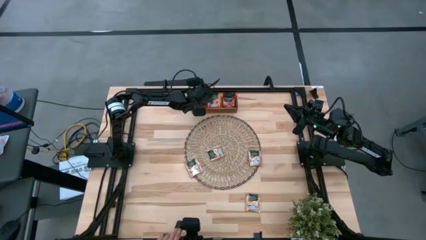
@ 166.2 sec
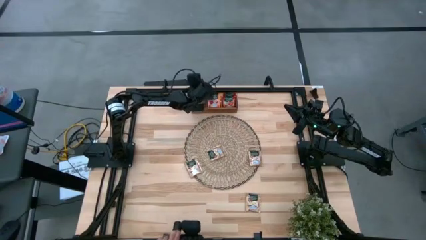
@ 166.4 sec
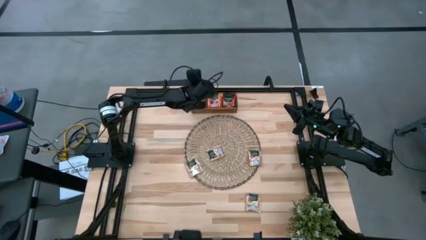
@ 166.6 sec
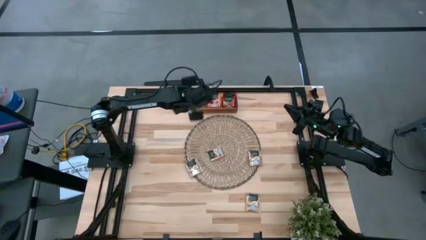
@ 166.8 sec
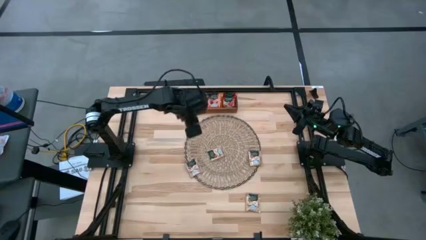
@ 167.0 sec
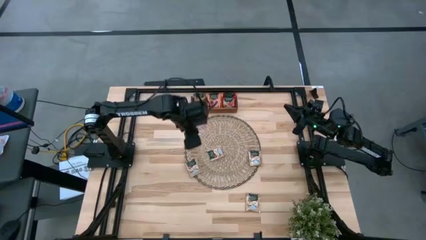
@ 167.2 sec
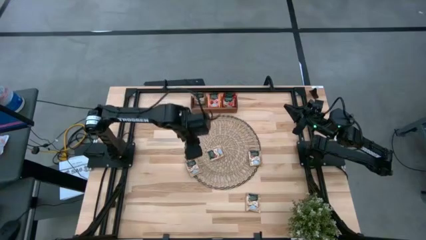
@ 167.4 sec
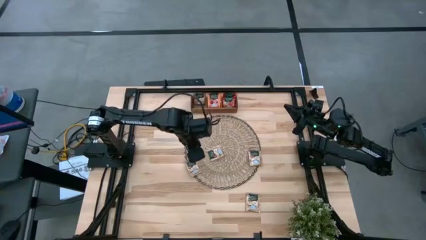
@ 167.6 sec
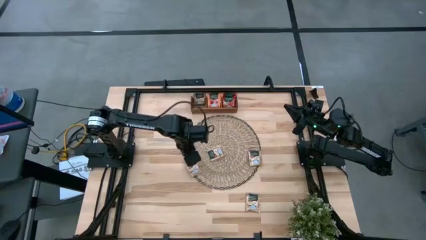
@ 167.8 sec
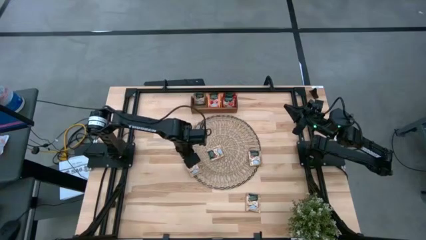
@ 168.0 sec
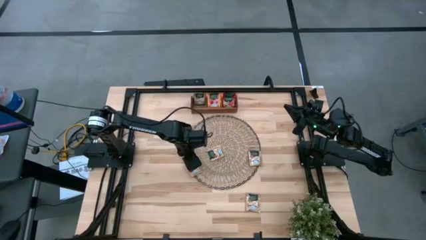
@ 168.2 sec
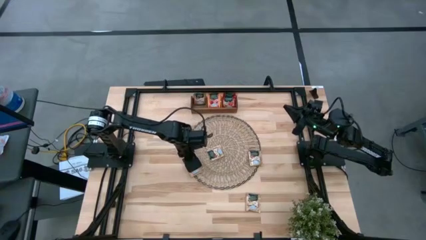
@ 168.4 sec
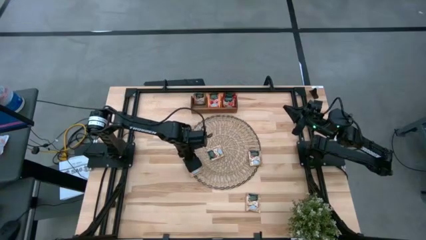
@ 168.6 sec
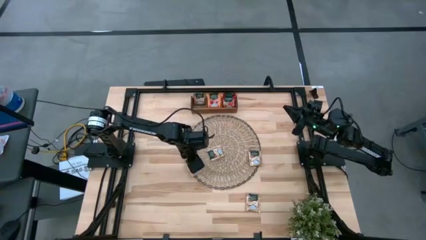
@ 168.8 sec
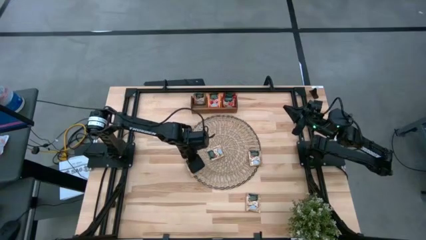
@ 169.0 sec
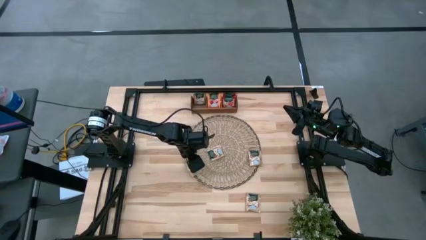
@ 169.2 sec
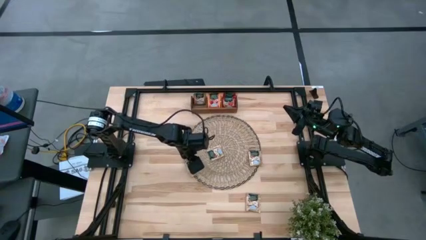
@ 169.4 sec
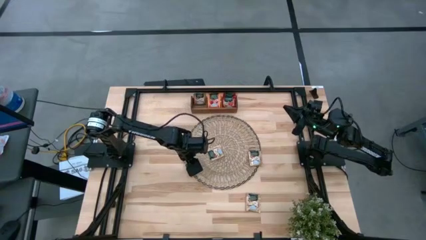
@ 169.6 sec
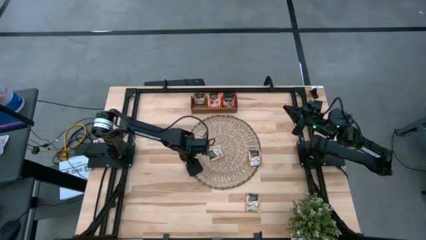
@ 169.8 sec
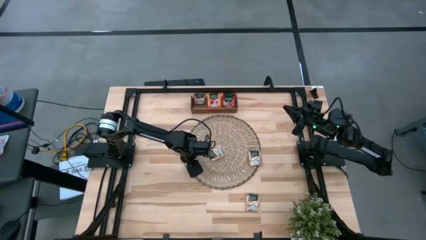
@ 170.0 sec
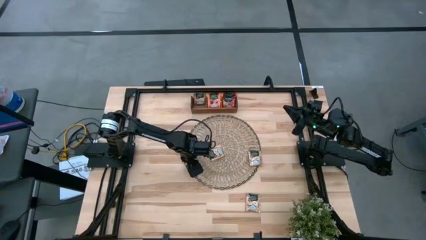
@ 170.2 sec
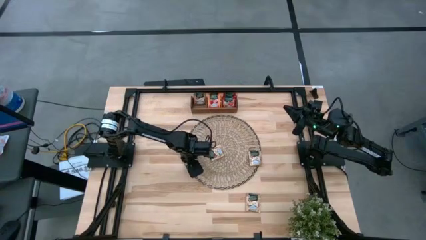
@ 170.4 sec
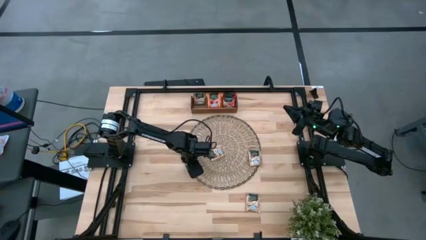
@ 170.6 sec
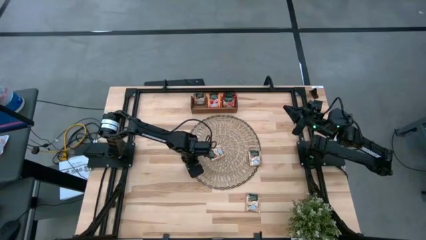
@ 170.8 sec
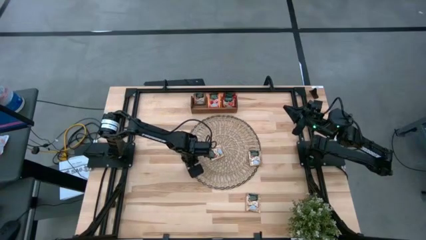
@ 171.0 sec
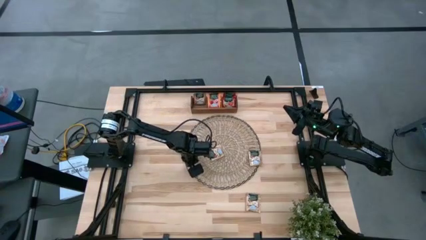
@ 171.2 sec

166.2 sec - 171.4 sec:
Task: Pick & Place Tea
Put the brown tea bag into the left section of the wooden organizer

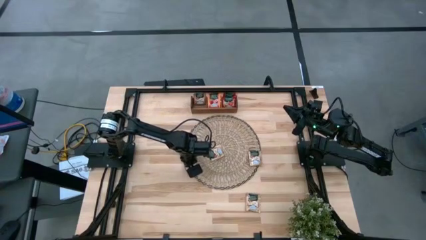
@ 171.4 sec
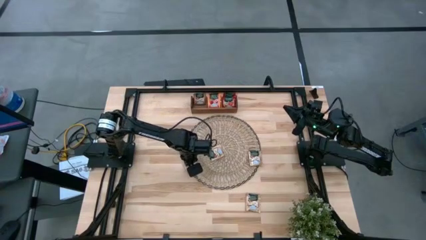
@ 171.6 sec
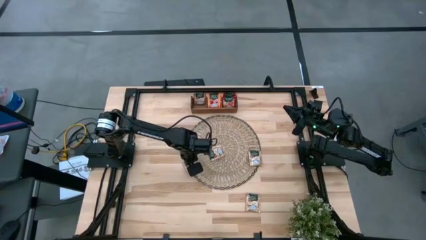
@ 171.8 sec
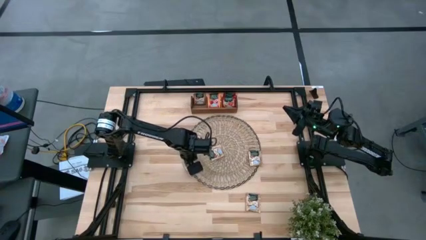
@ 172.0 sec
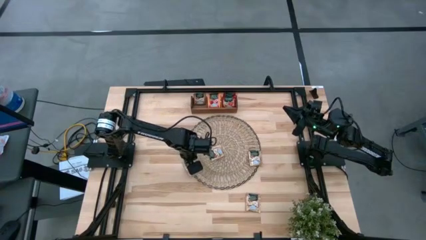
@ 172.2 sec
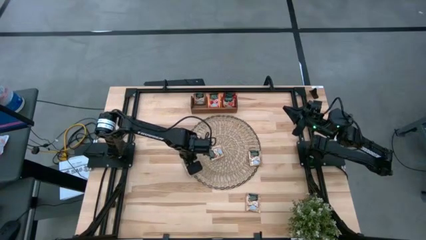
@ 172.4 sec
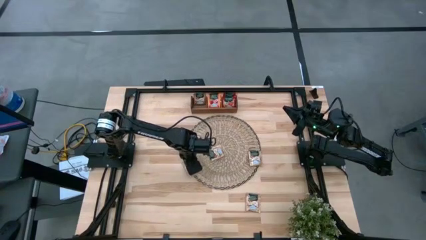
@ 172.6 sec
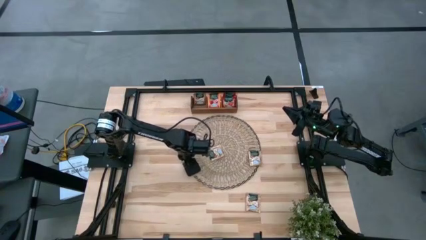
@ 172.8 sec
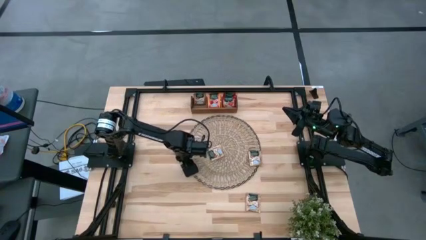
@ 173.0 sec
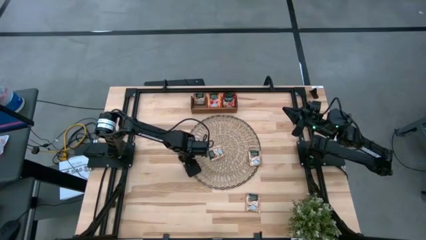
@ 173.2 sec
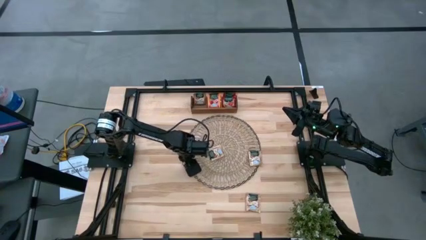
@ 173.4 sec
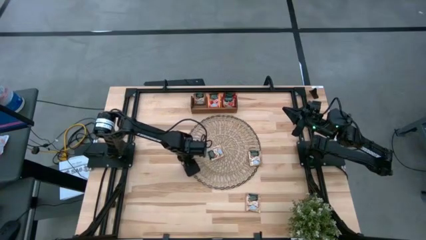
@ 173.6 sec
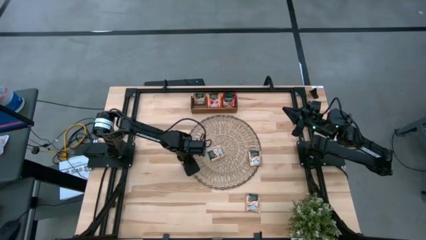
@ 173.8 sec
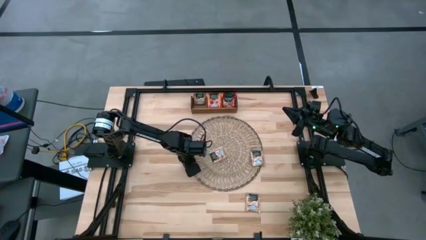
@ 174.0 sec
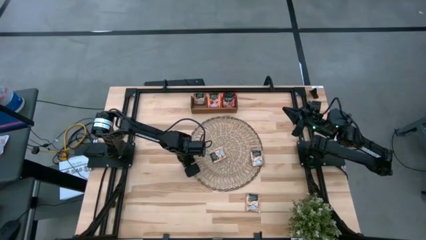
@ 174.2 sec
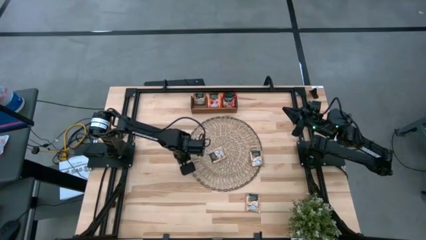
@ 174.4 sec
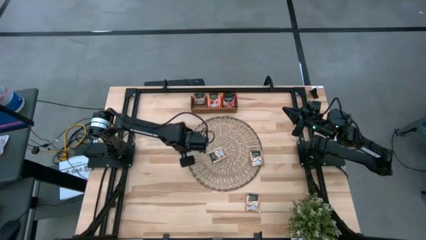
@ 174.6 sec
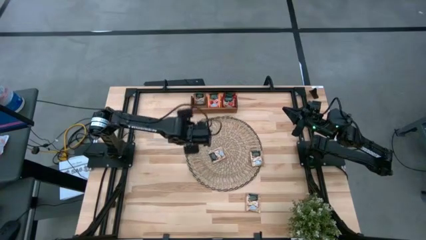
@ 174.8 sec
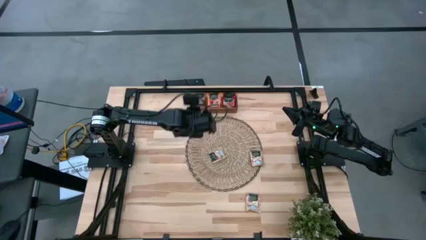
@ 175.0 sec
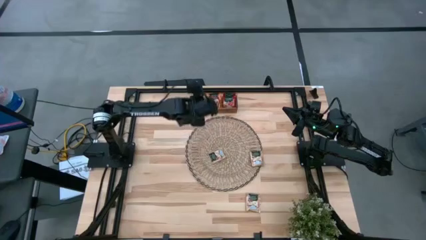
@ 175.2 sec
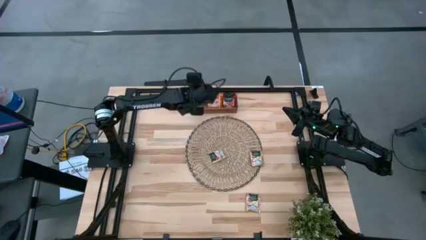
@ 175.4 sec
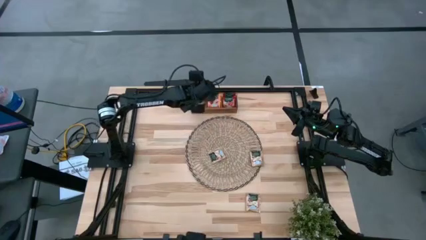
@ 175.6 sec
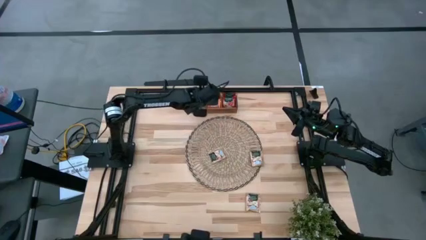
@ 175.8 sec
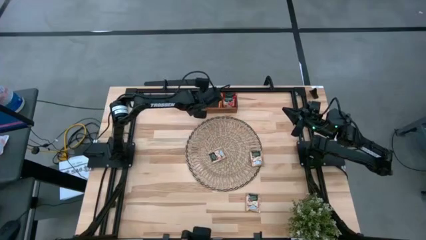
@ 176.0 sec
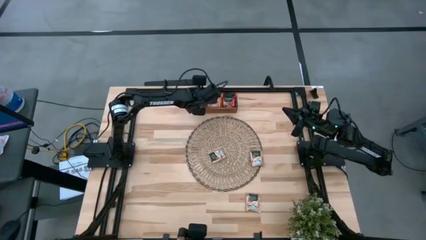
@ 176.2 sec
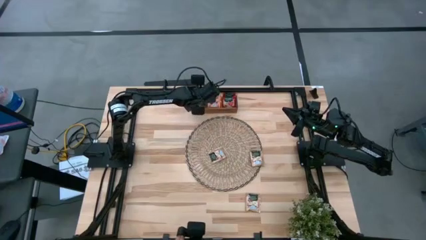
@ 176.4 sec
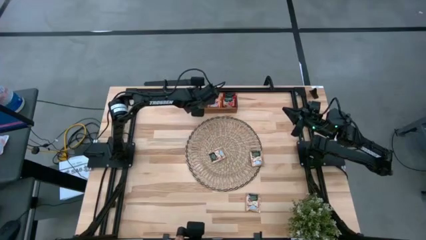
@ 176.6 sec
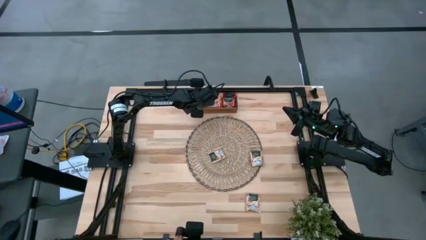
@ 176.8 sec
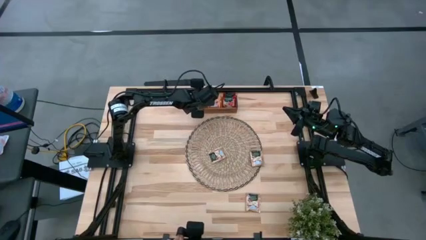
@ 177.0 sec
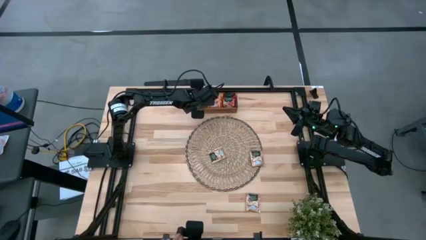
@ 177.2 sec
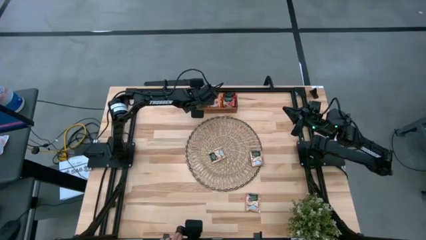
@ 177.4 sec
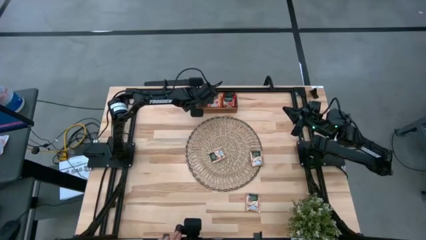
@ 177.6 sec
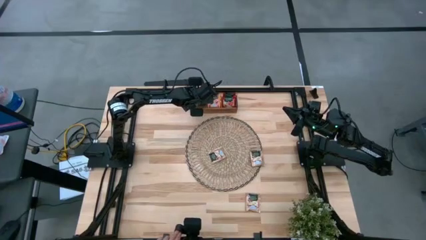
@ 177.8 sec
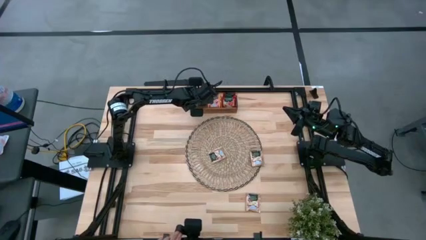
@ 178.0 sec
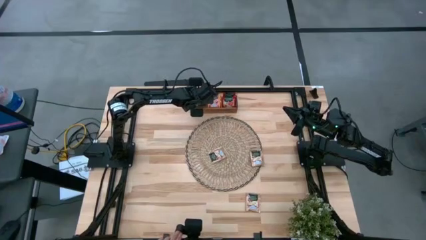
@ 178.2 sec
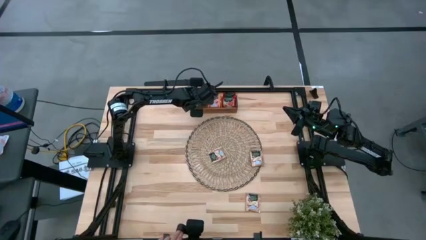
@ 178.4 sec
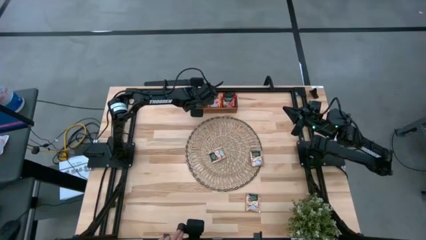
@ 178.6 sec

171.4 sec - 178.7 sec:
Put the brown tea bag into the left section of the wooden organizer

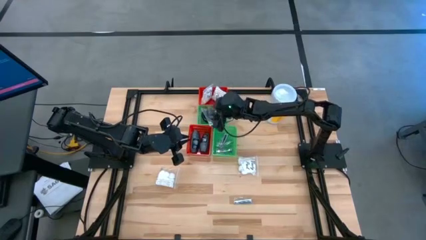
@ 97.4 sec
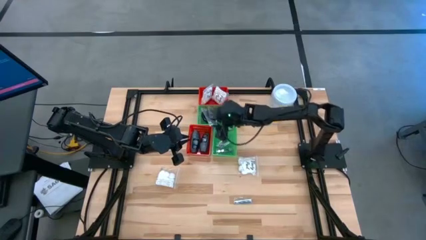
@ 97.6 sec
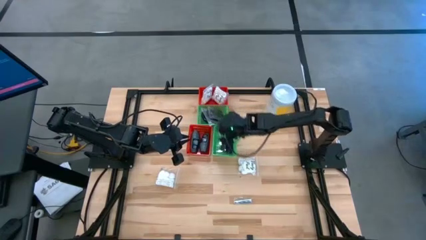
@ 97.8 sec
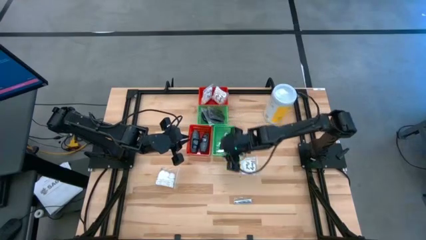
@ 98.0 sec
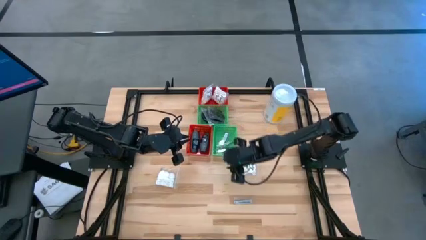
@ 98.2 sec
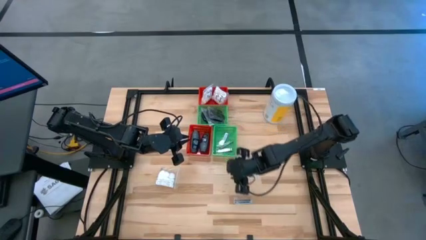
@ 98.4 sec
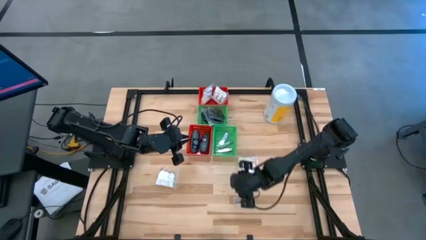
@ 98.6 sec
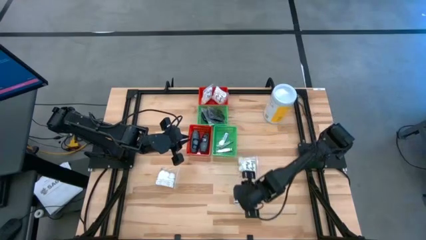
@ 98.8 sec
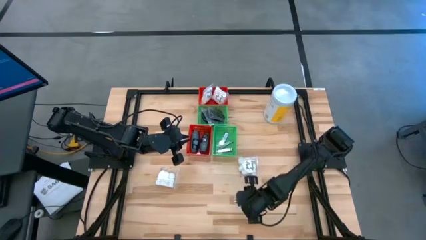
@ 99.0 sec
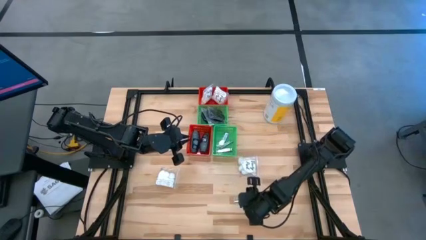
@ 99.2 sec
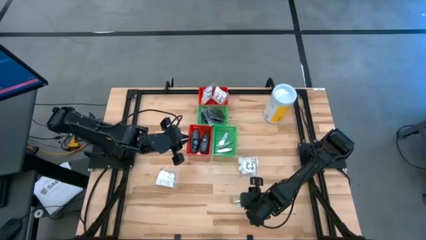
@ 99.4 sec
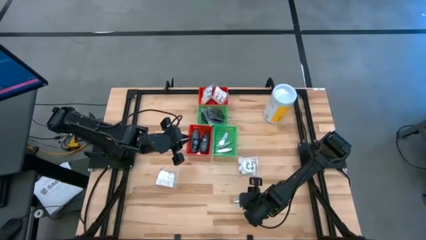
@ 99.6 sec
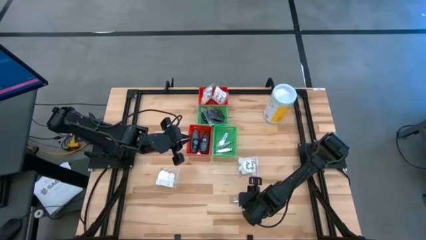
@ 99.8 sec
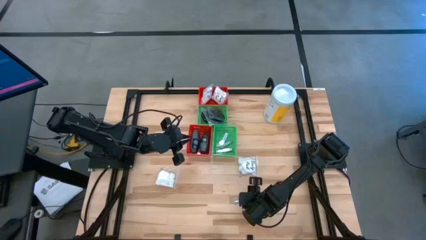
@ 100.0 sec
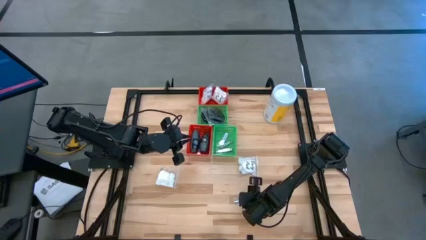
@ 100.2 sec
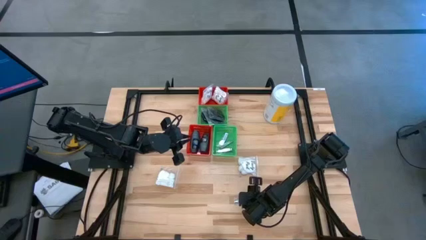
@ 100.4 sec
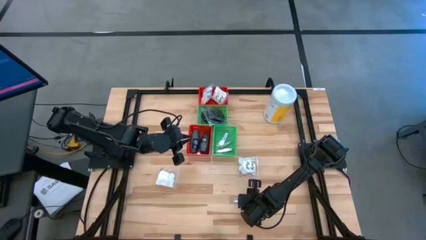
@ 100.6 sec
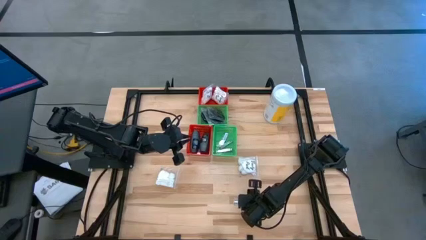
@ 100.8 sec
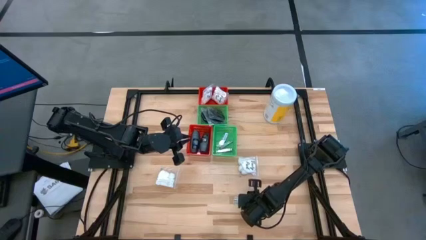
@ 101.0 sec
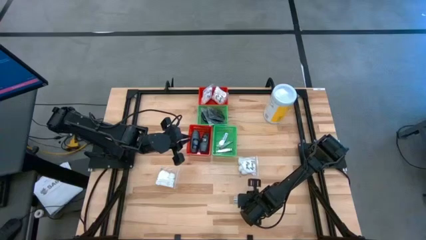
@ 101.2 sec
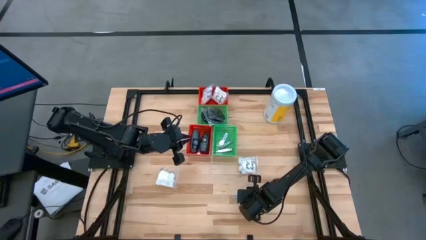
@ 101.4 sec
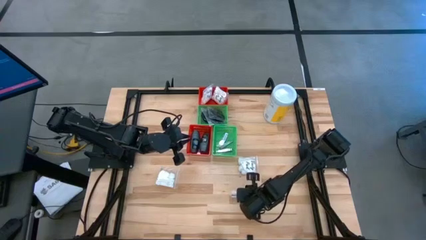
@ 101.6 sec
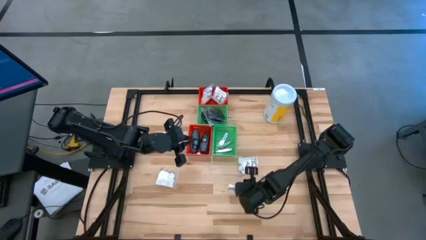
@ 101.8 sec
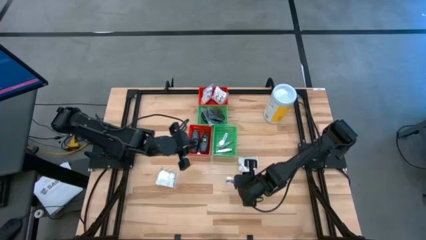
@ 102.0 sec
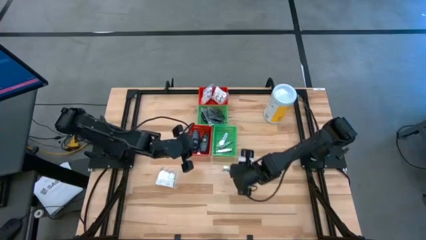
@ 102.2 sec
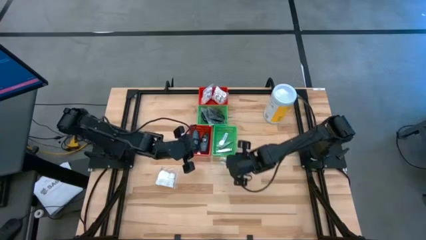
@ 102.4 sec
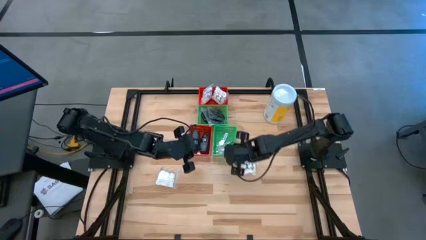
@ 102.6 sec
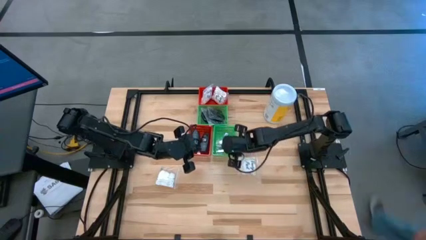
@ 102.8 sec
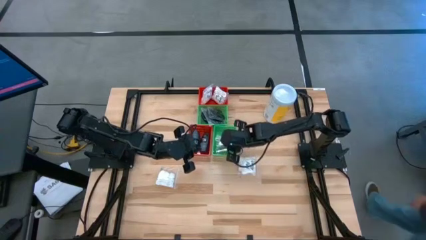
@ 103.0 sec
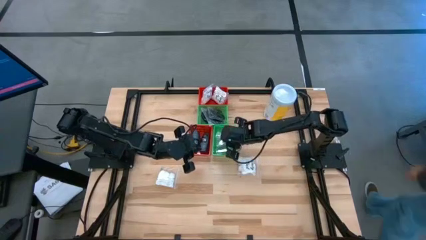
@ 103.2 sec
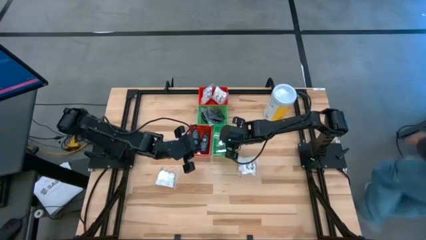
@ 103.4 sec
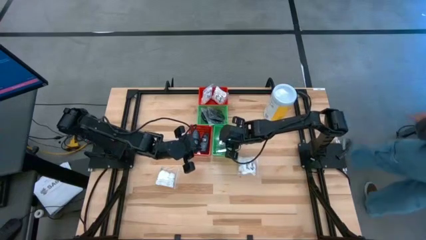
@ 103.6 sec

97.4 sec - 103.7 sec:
Task: Pick & Place Travel size toiletries
Put the silver nail cutter into the bottom green bin
